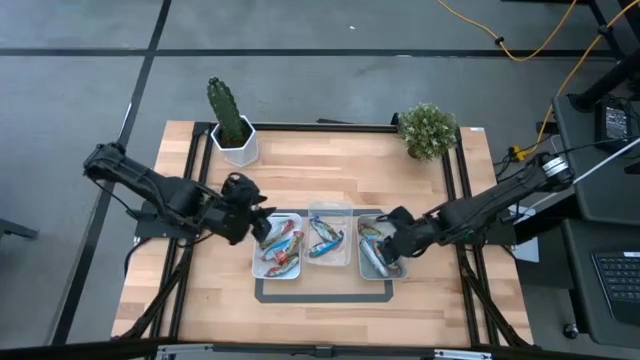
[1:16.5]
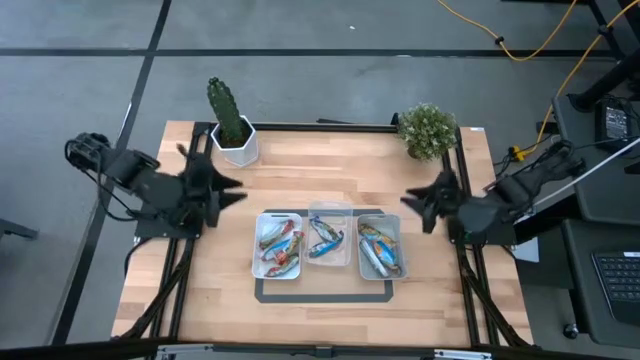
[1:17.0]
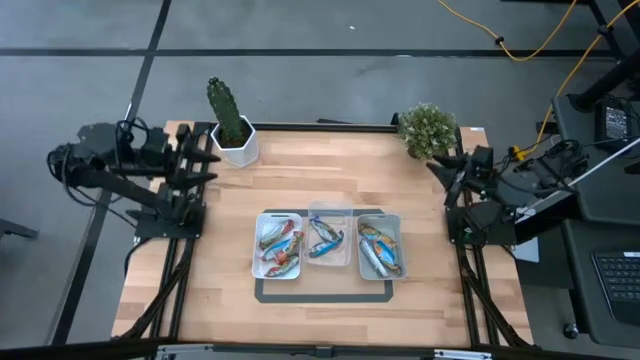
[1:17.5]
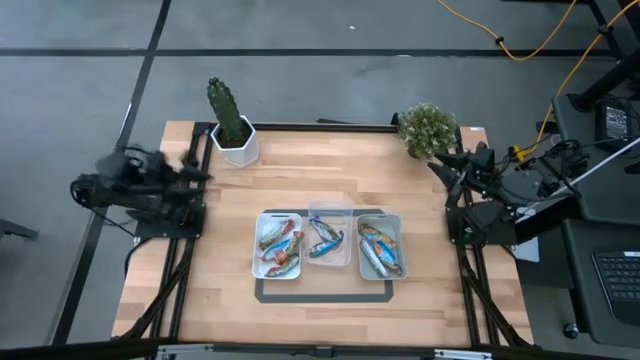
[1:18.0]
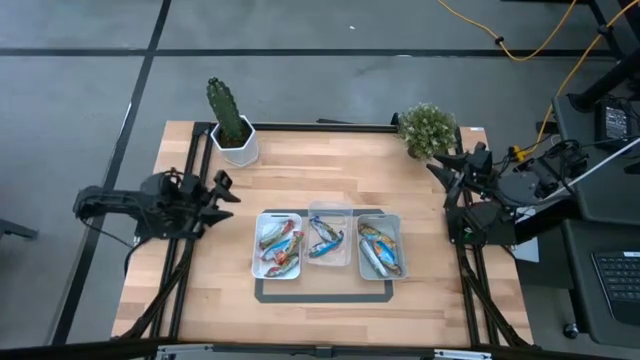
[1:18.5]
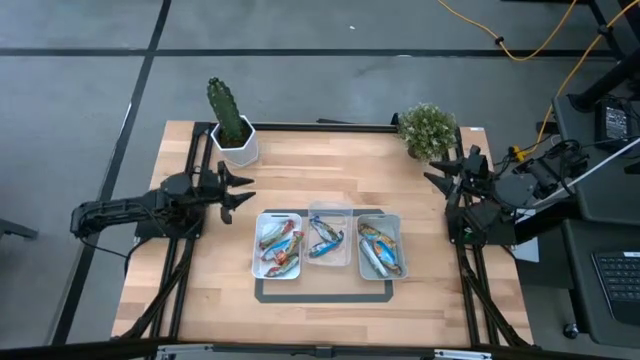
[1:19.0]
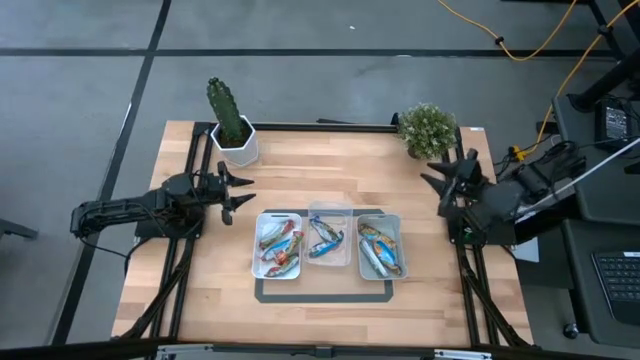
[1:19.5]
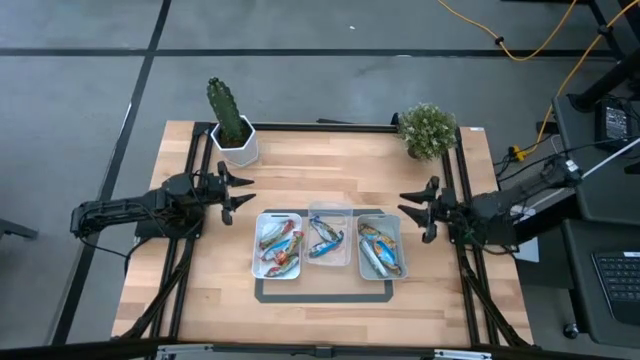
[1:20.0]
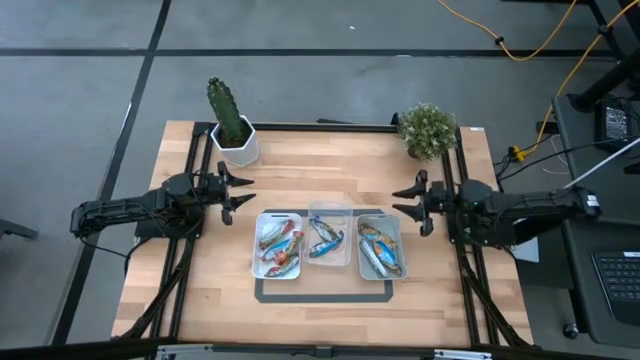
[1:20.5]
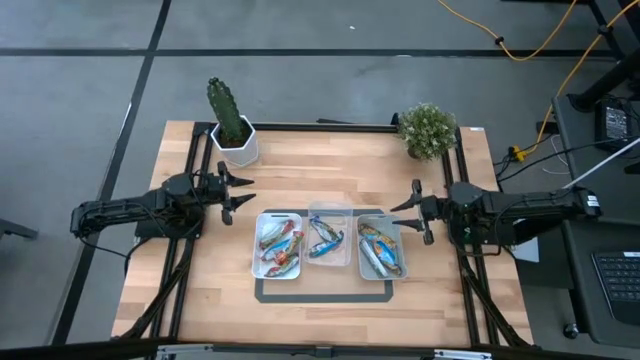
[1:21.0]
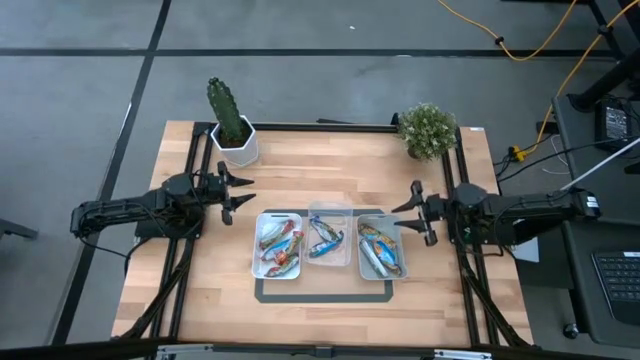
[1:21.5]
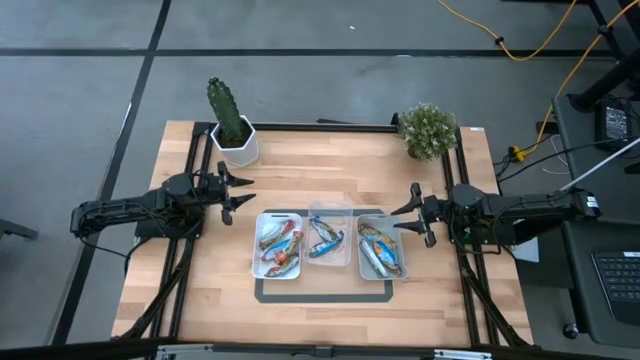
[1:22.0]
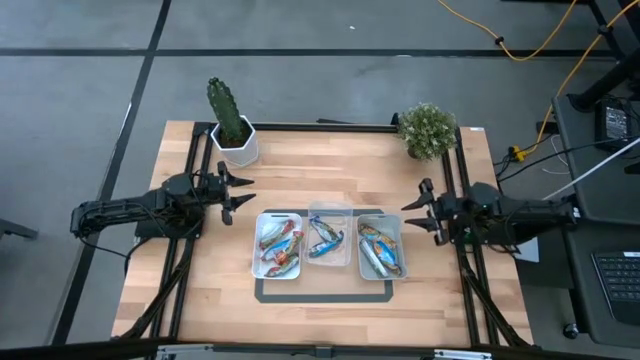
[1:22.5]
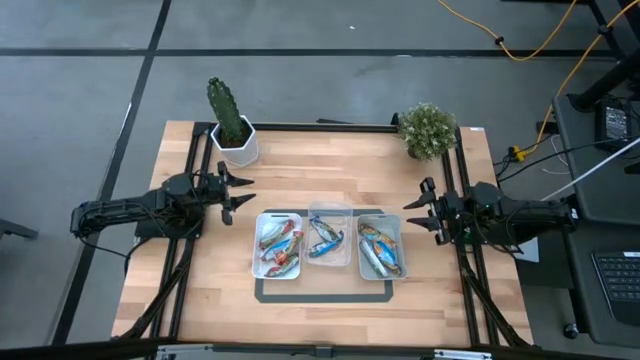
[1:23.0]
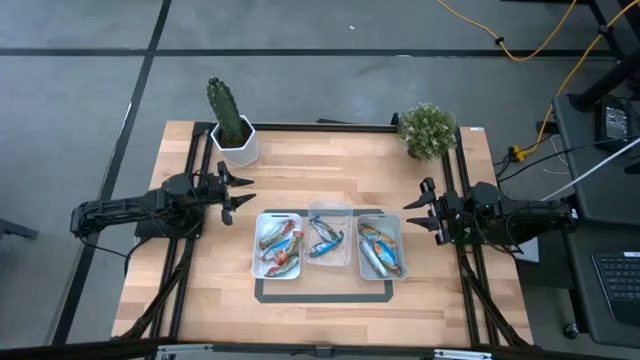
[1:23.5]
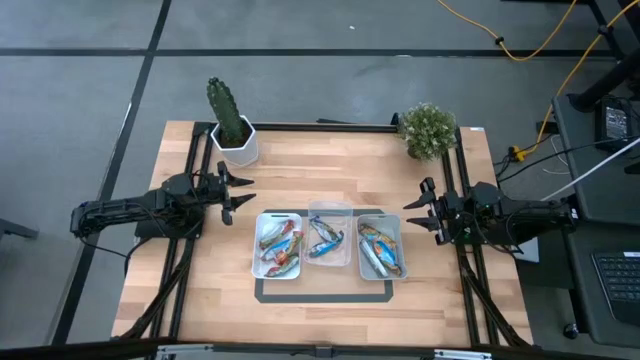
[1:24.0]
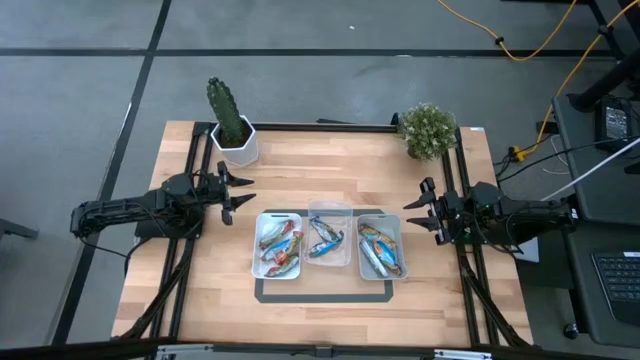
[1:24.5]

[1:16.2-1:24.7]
Task: Pick and place Granola Bars by type
Return to Home Position

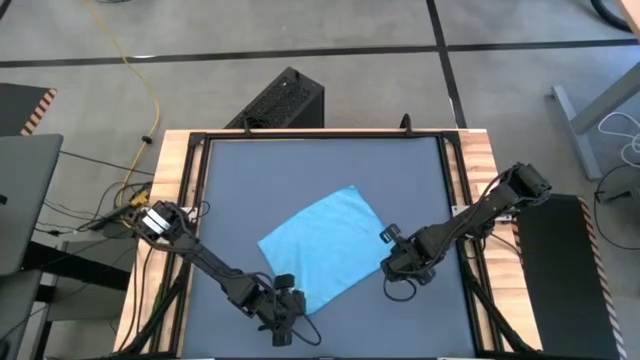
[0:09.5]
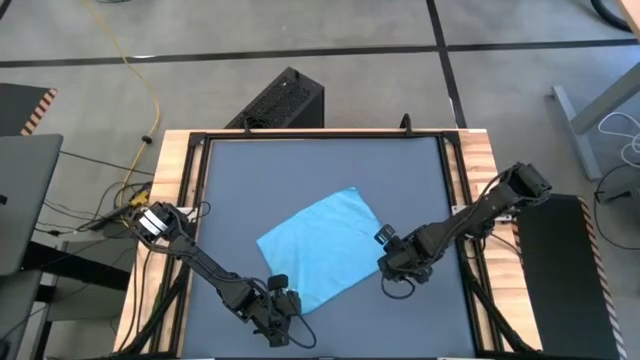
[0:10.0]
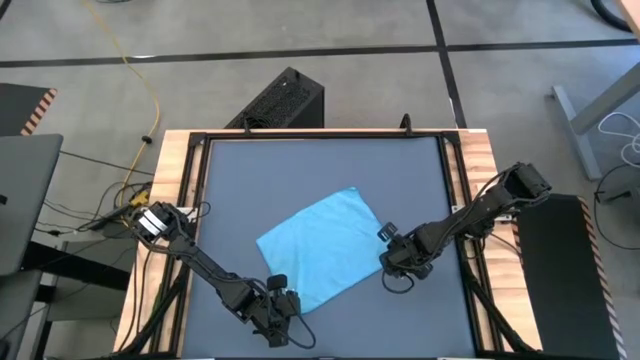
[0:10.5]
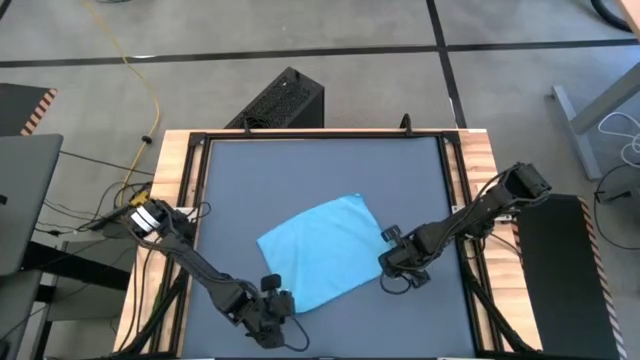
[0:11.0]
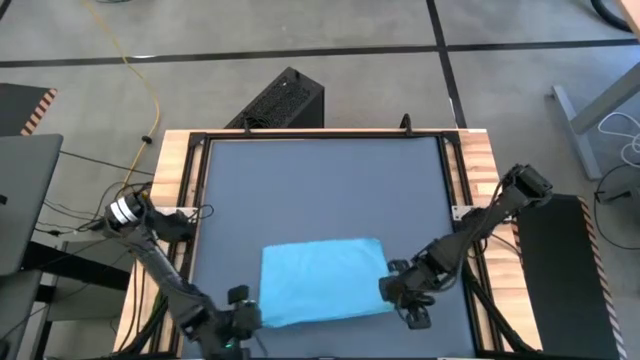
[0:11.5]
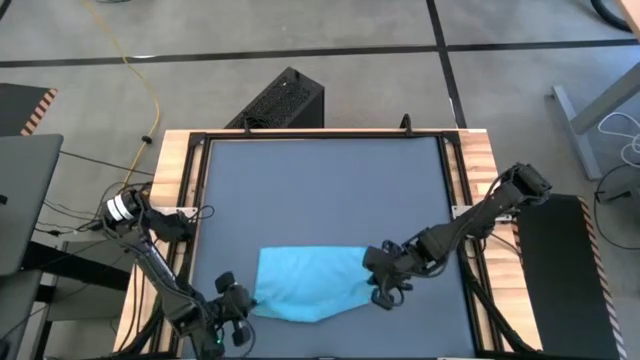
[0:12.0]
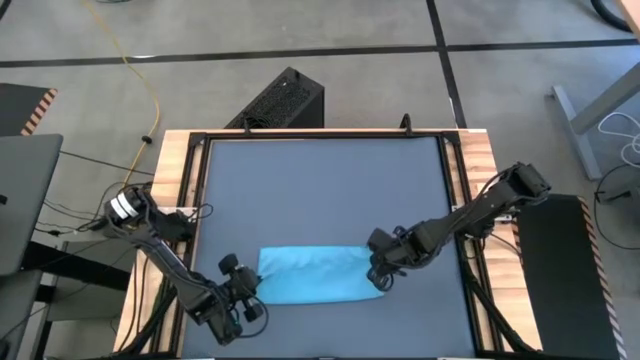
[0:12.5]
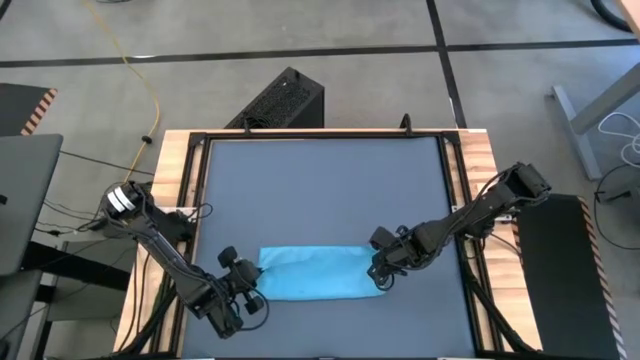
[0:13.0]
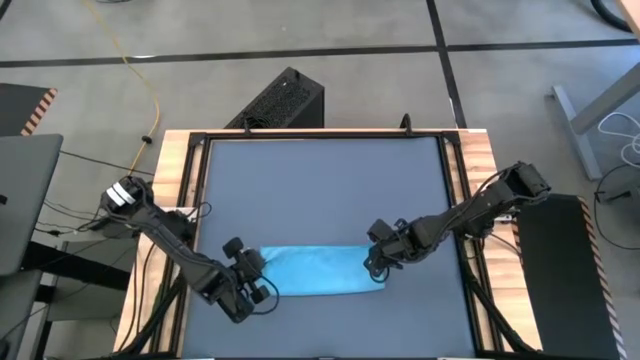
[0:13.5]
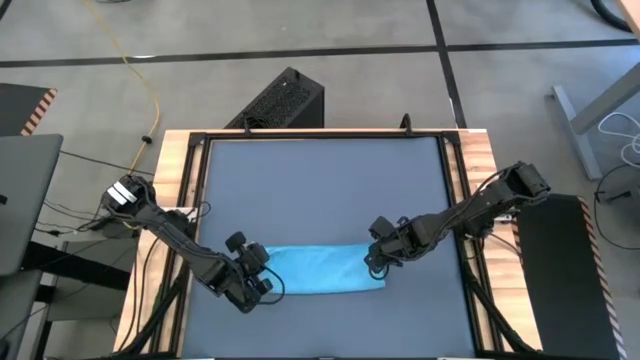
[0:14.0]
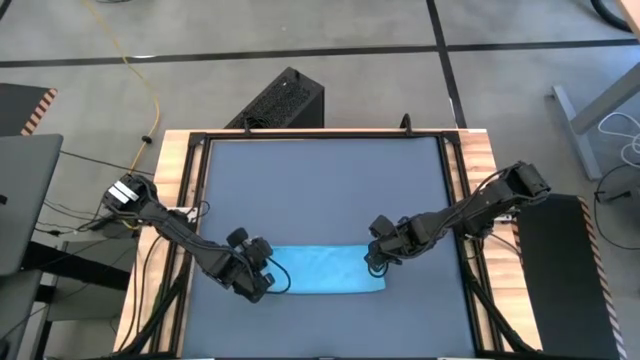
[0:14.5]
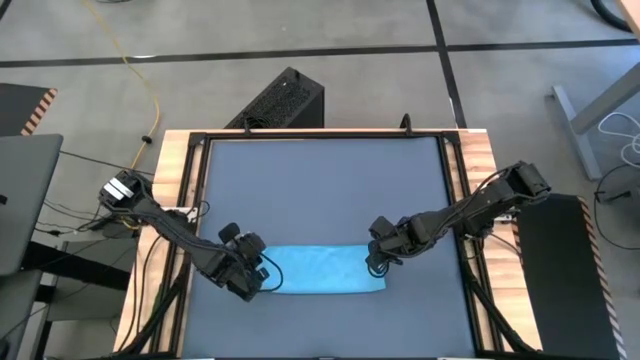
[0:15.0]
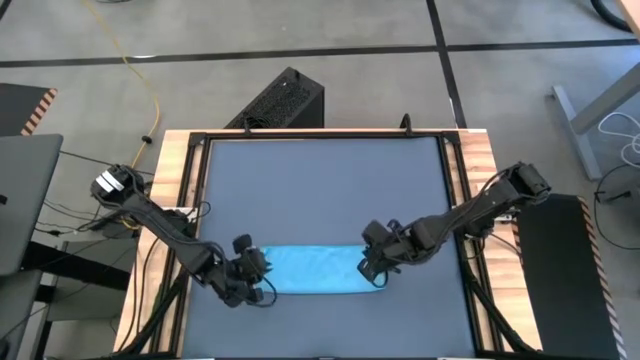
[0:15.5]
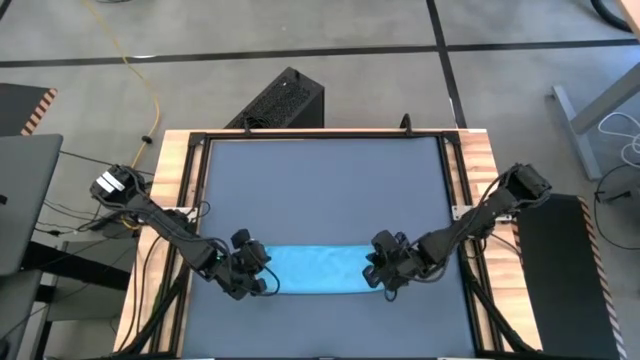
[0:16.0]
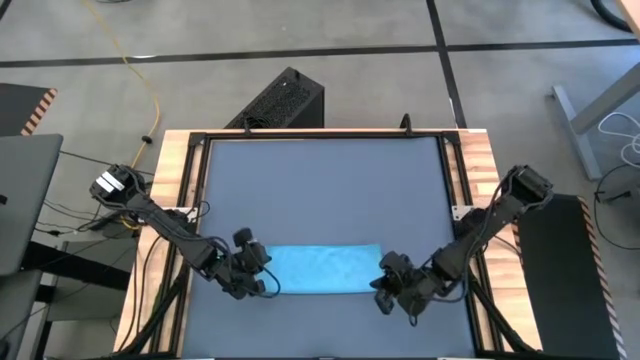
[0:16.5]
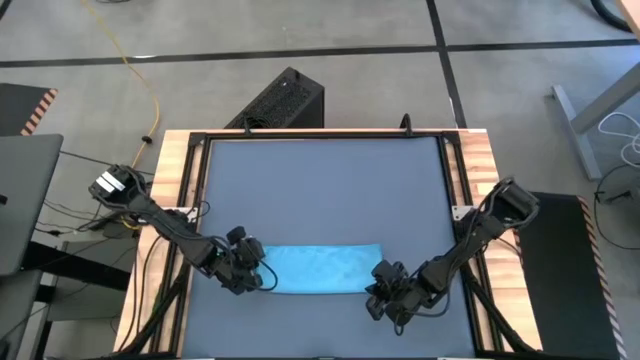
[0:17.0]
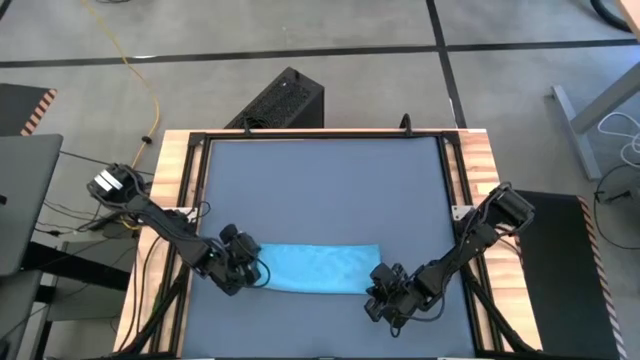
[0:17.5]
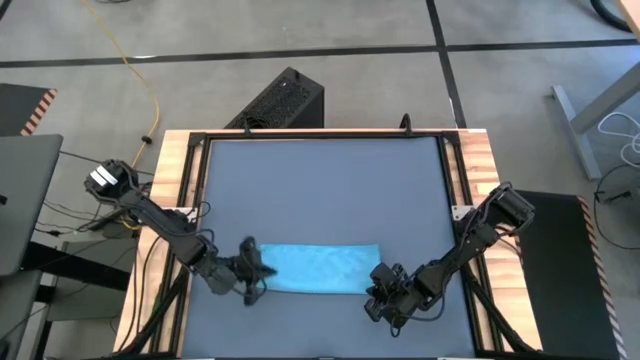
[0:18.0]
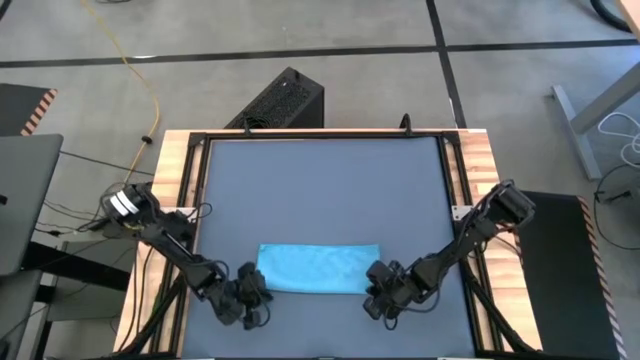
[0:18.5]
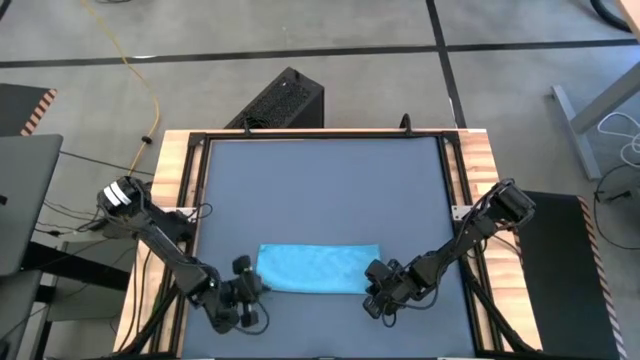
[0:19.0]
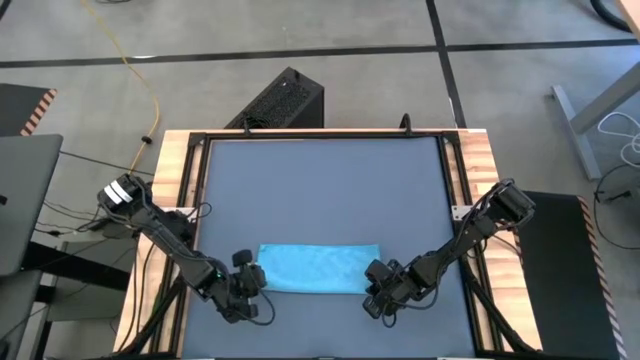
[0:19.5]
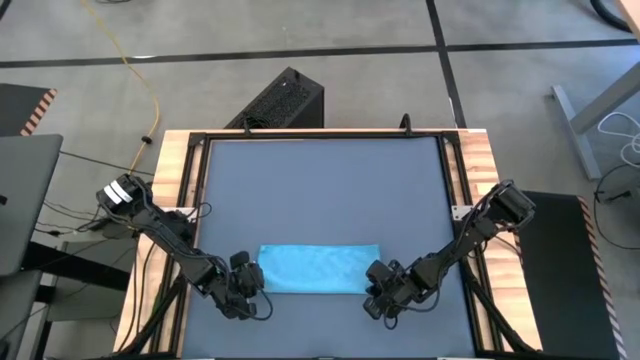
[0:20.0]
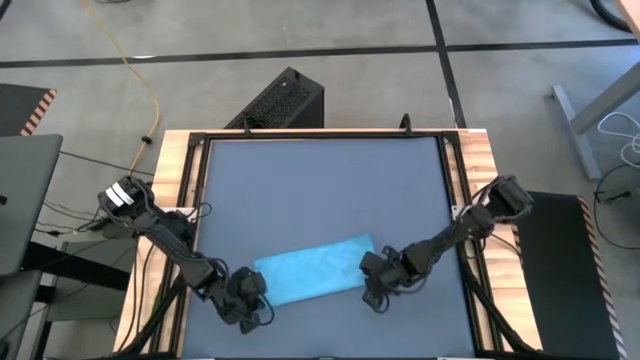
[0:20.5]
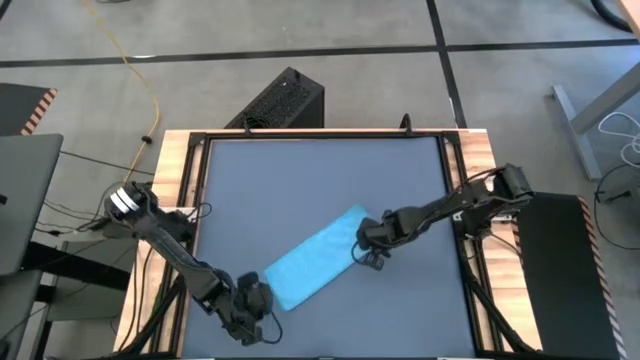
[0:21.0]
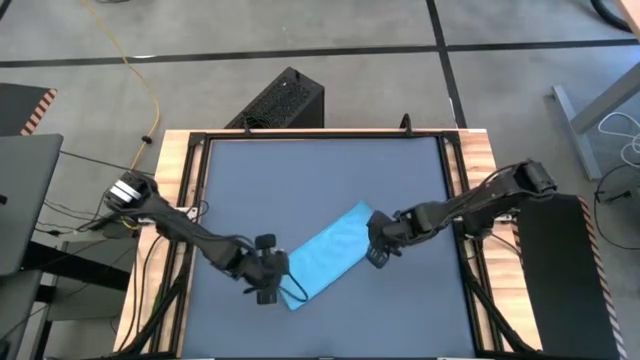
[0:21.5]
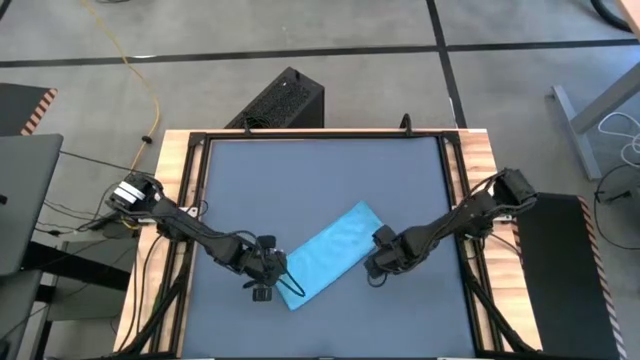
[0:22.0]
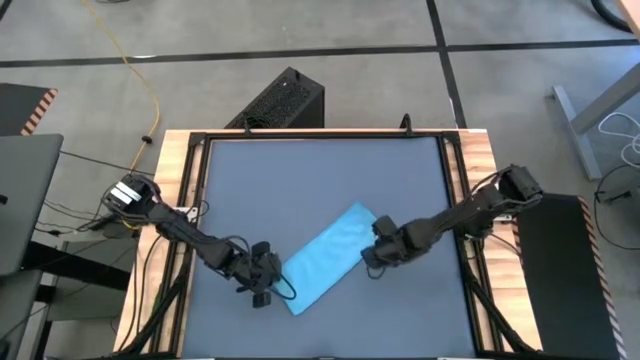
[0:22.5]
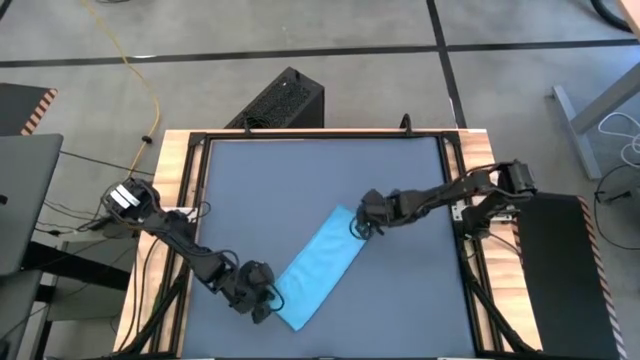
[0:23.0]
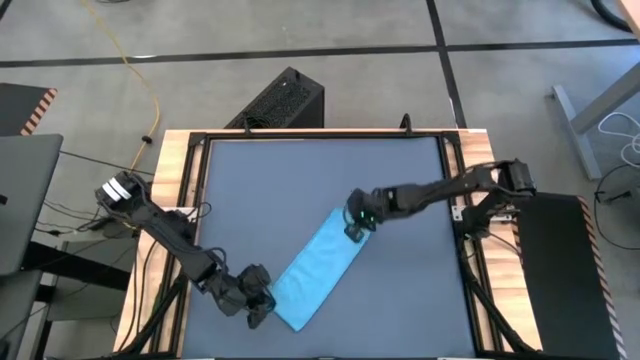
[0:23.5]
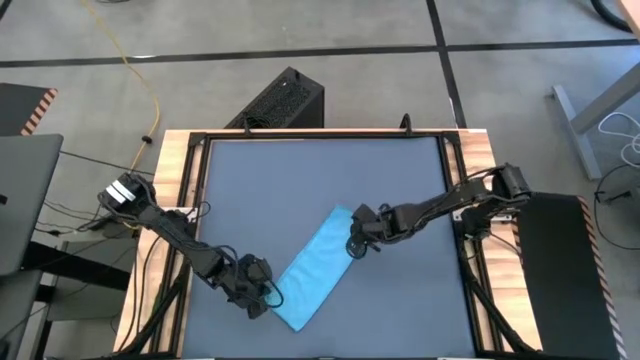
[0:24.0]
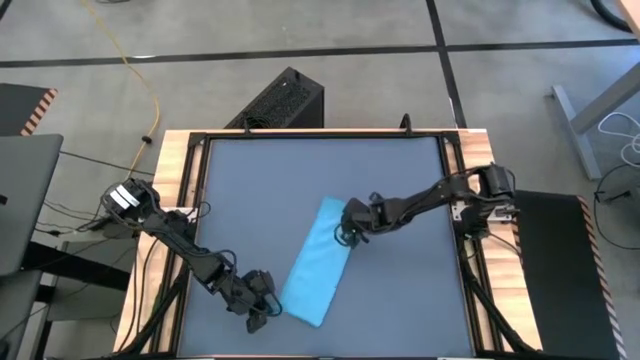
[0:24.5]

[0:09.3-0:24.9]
Task: Roll towel
Fold the blue towel
